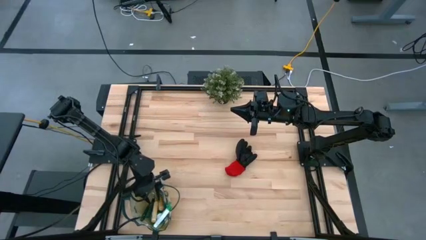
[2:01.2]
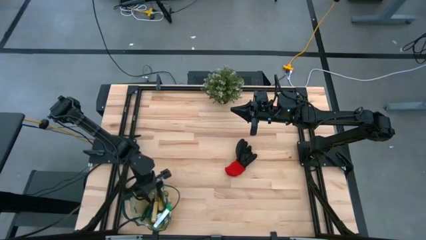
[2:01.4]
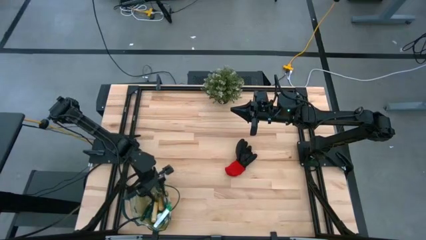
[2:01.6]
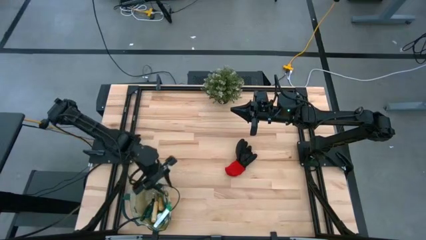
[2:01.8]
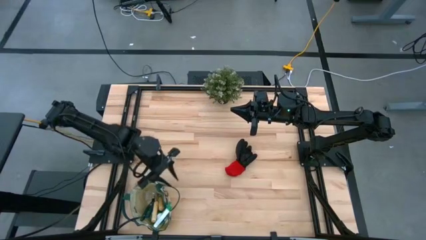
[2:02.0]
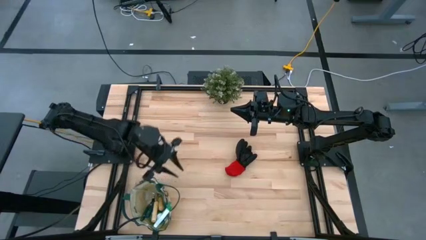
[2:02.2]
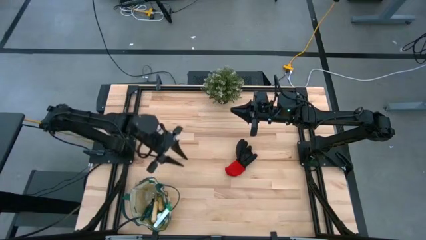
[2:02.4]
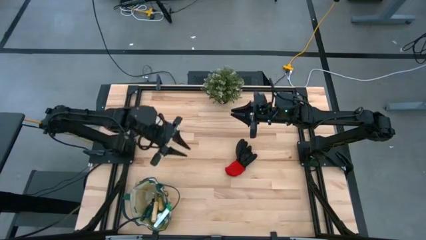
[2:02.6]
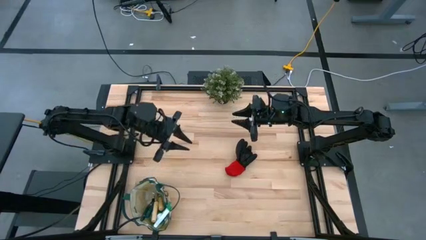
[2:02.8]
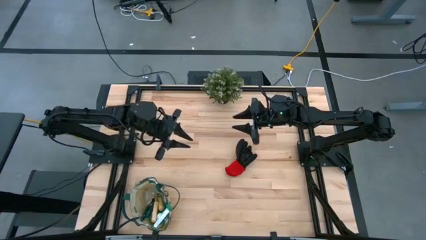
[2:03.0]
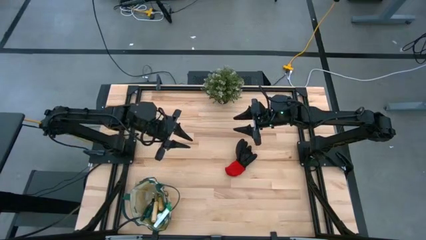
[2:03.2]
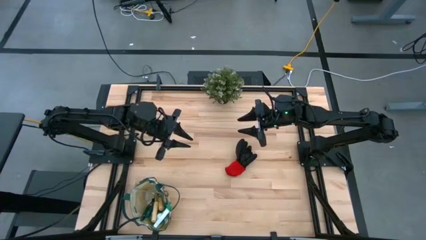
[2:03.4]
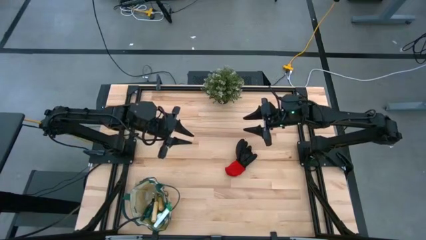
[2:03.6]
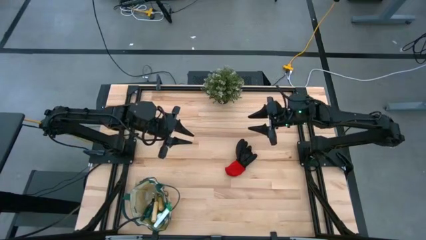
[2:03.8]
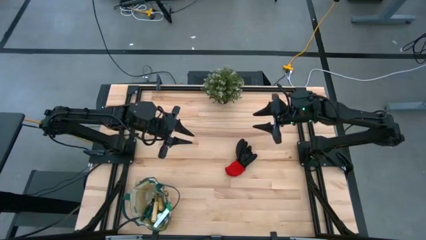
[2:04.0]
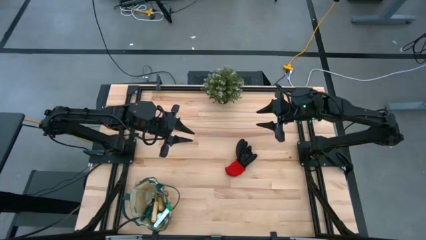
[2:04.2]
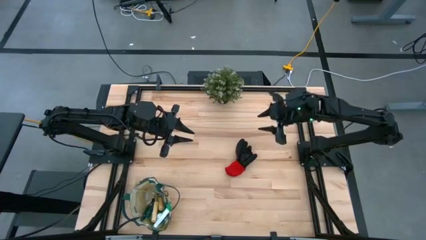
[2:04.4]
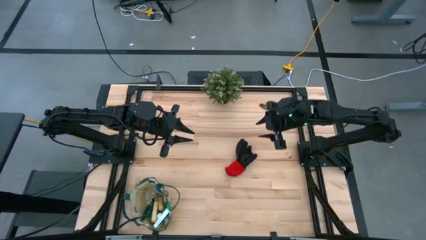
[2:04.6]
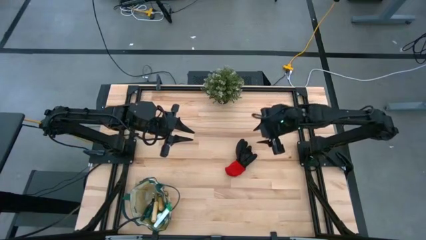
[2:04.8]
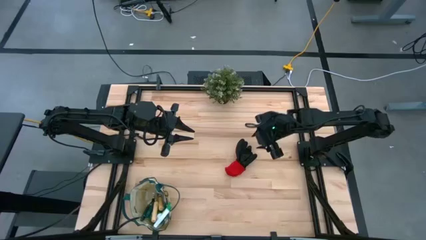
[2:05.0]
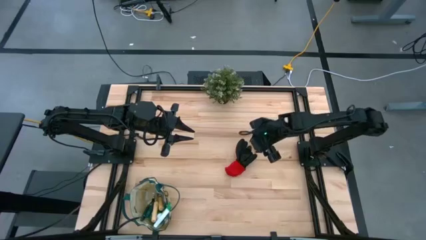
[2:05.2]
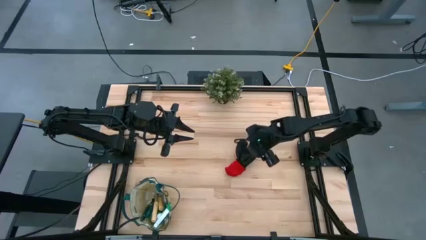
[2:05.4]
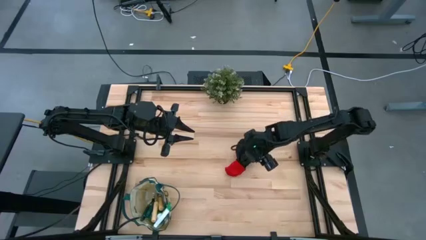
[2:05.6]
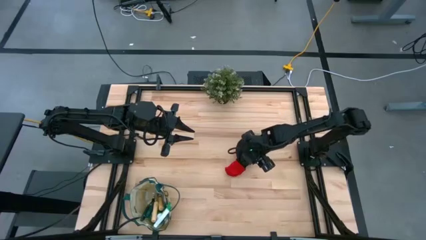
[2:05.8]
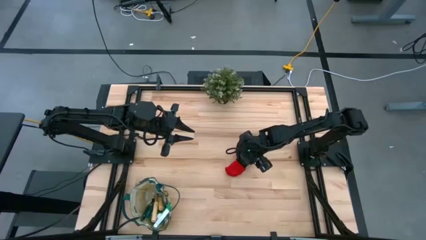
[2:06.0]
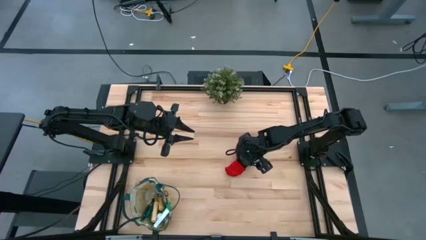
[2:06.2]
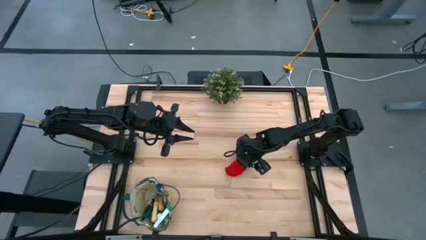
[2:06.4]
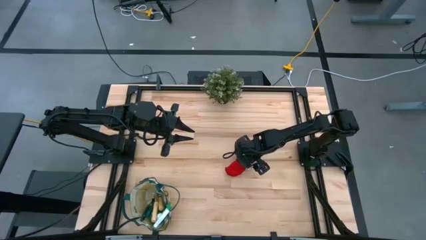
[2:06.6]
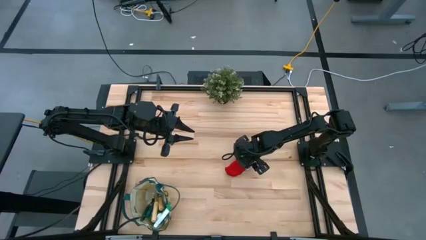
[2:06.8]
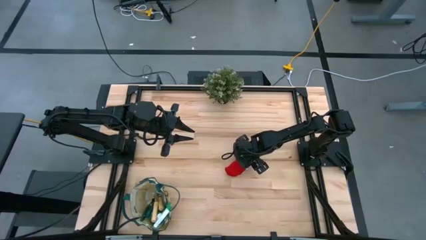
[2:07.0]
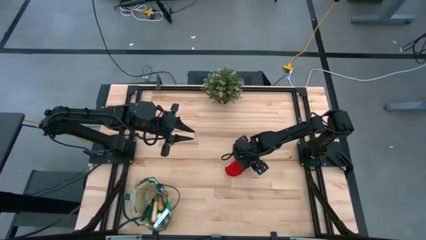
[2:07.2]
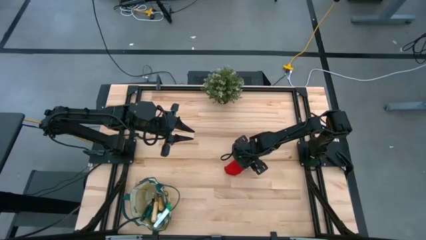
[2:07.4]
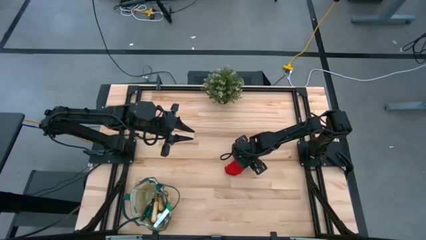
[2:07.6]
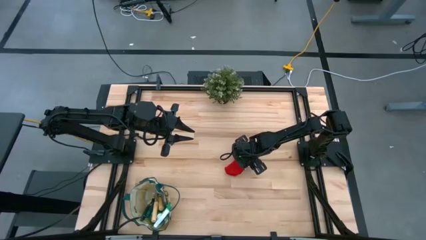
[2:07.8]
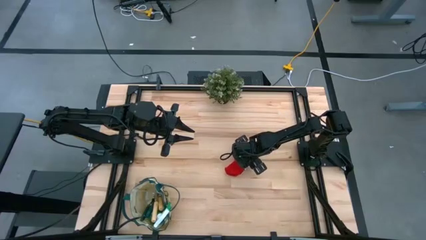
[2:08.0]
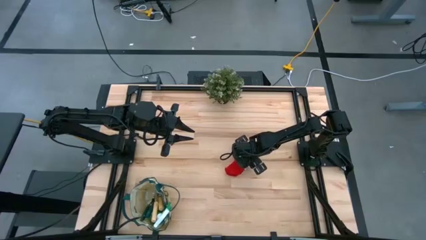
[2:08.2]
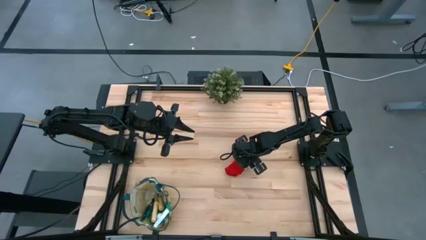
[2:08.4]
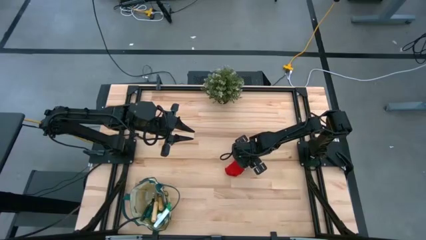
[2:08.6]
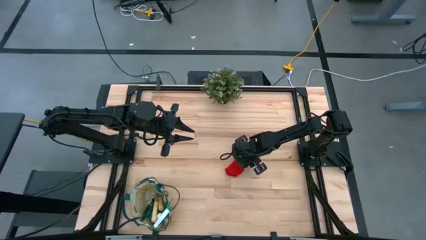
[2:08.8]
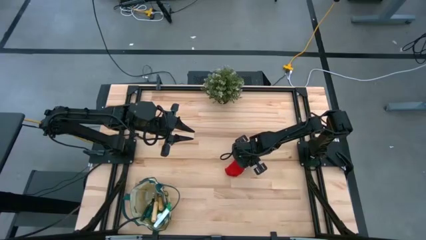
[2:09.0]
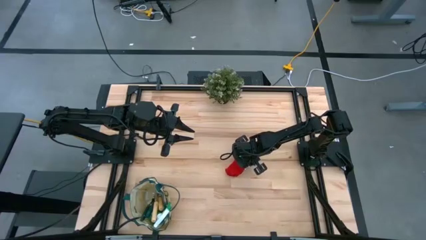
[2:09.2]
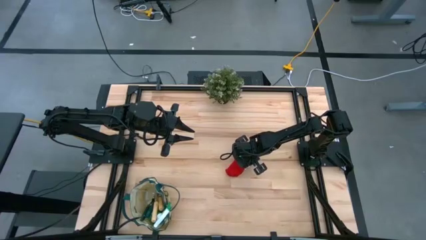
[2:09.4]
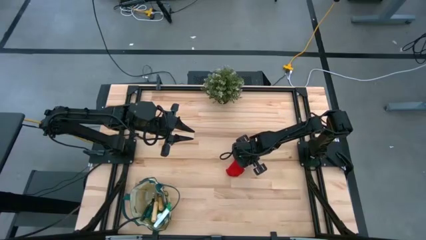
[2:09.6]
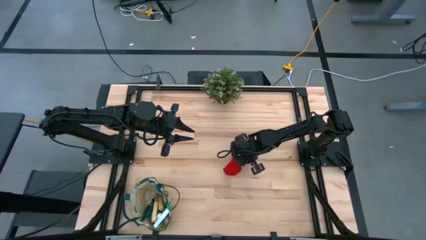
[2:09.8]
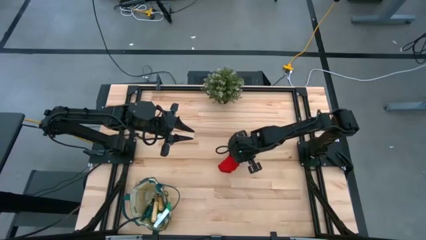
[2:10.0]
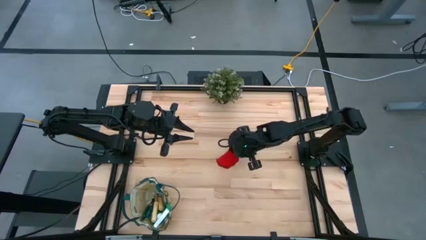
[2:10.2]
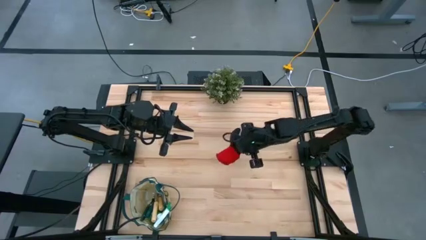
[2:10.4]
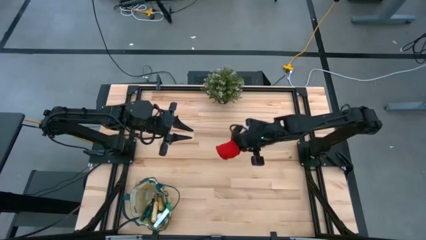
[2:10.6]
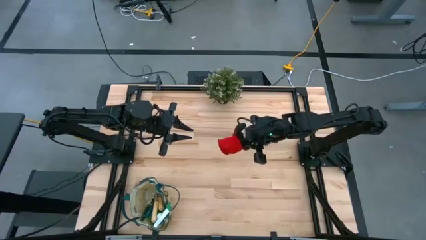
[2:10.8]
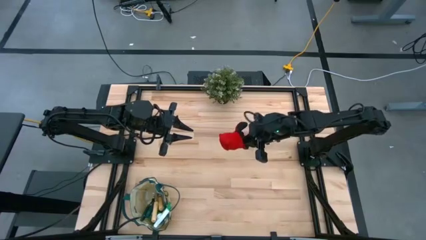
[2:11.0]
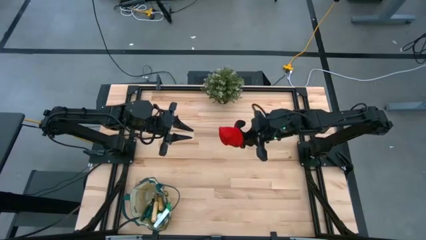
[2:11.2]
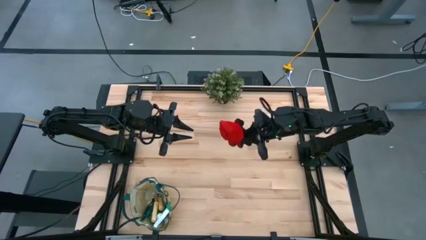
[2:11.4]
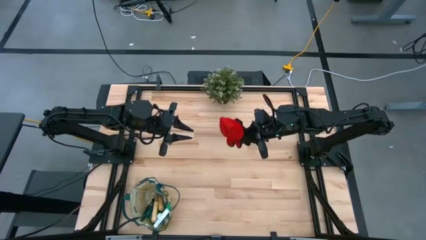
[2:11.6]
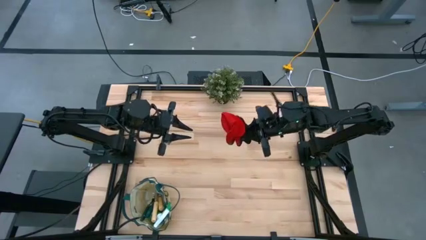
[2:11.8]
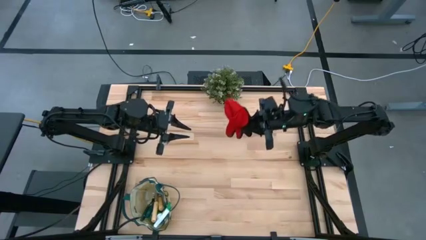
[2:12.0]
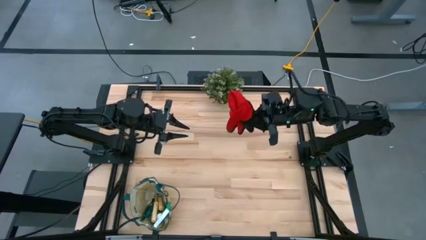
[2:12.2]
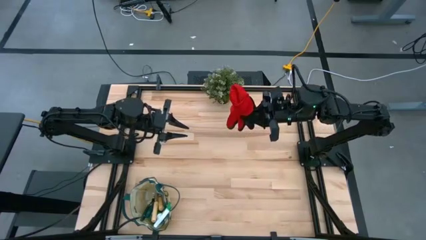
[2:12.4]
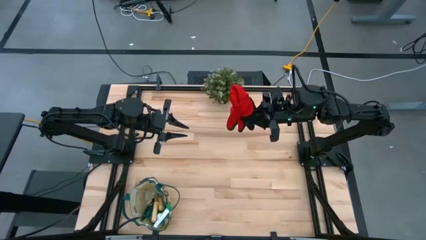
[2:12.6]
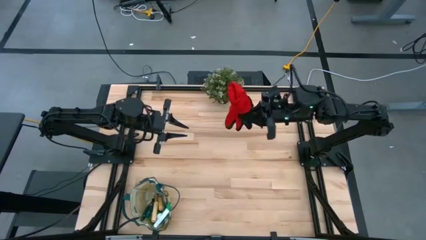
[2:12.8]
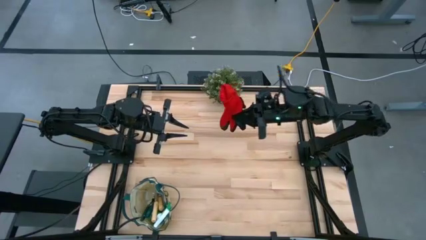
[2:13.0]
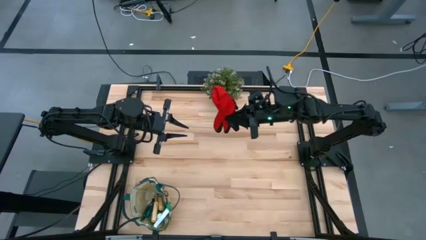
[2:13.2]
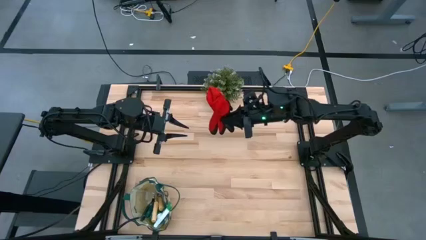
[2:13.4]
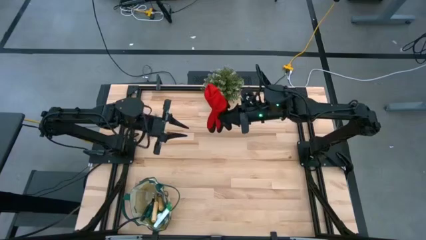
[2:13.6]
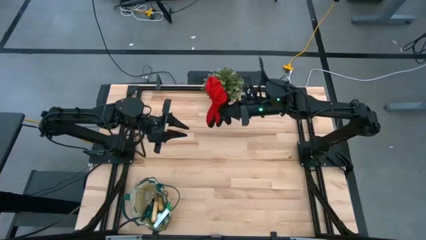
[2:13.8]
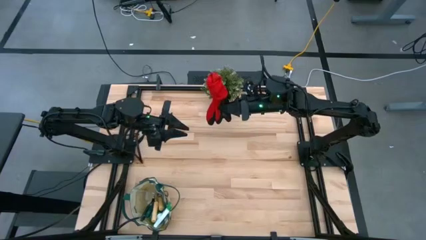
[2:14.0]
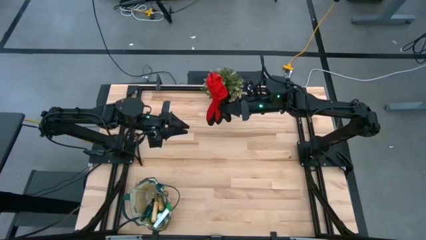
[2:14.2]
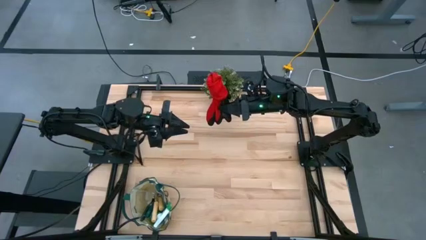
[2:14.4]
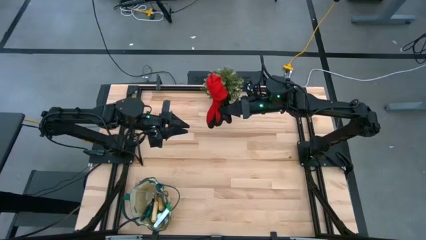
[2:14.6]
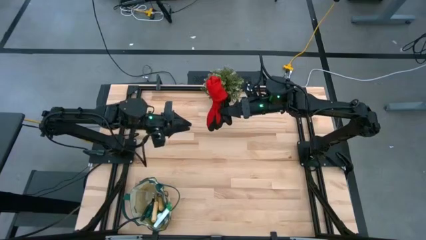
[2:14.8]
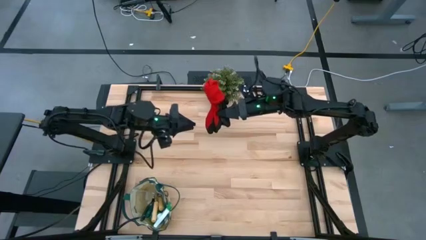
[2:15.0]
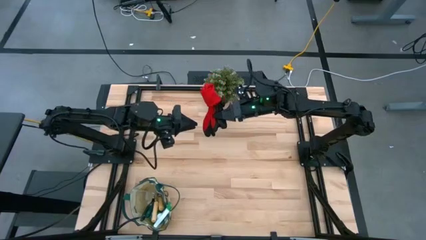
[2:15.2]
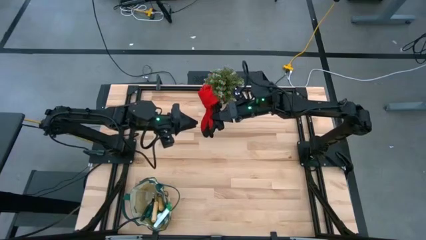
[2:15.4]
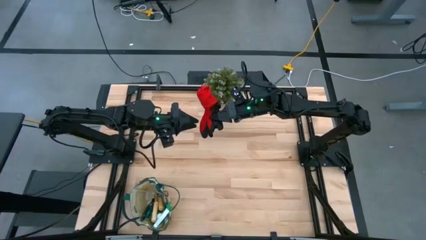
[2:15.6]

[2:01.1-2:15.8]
Task: Pick & Place Garden tools in Gardening bag
Put the red gloves into the gardening bag

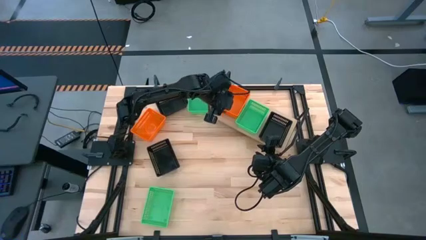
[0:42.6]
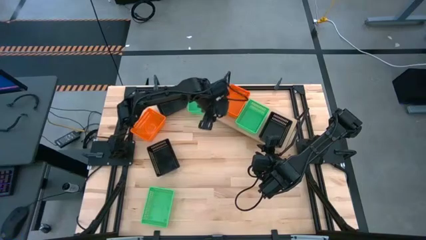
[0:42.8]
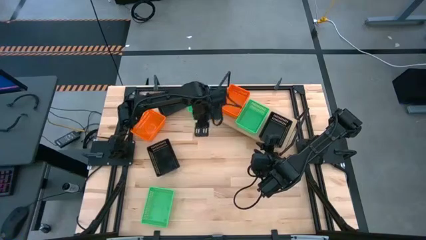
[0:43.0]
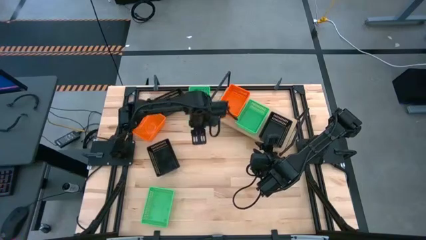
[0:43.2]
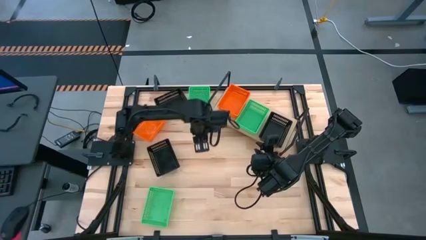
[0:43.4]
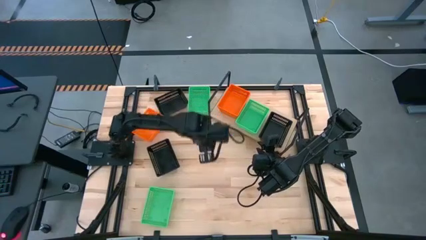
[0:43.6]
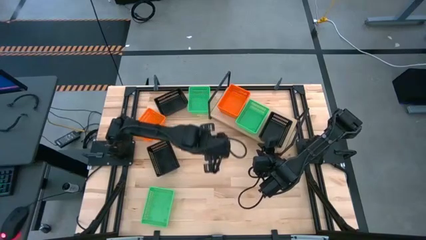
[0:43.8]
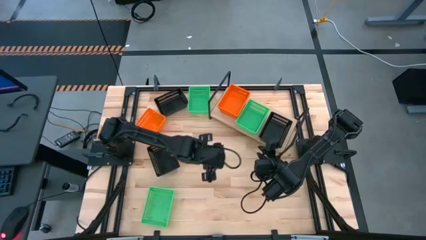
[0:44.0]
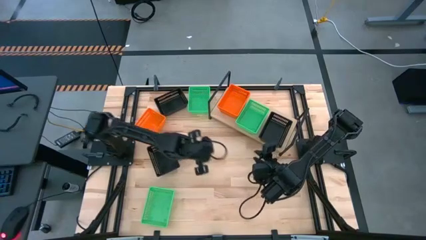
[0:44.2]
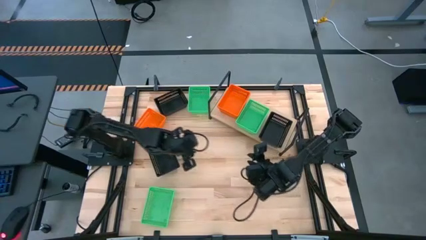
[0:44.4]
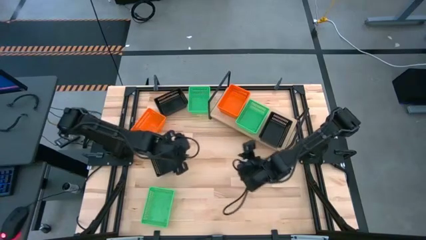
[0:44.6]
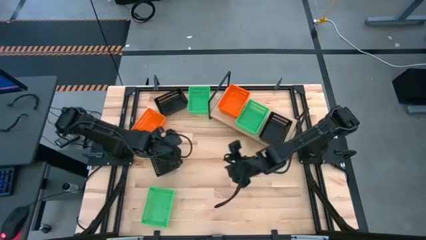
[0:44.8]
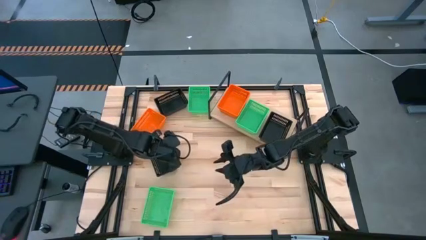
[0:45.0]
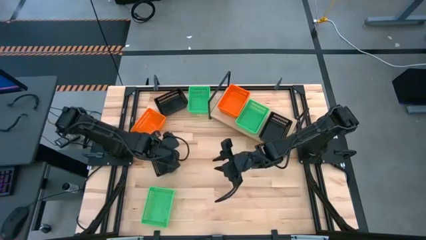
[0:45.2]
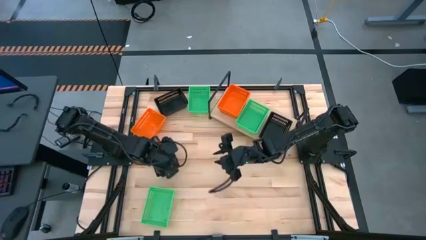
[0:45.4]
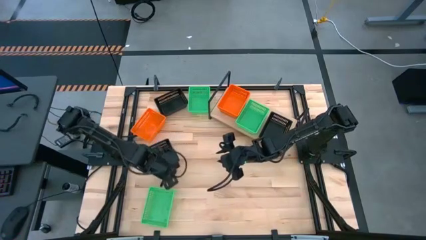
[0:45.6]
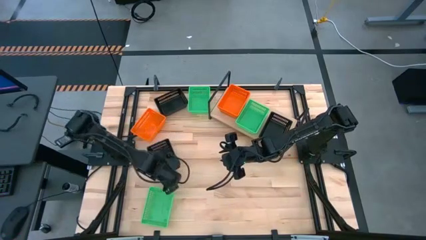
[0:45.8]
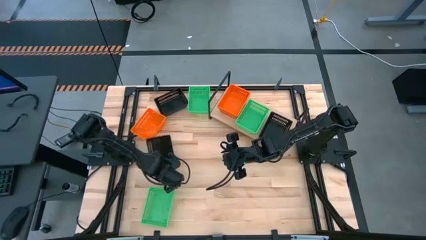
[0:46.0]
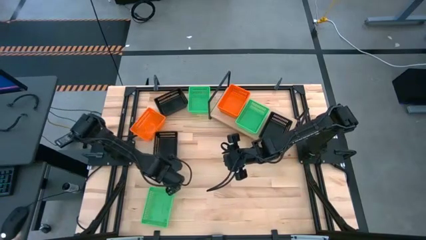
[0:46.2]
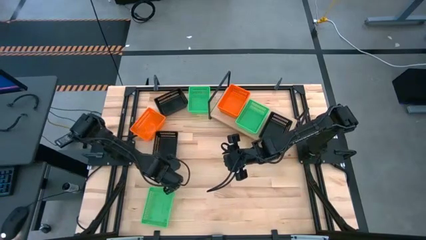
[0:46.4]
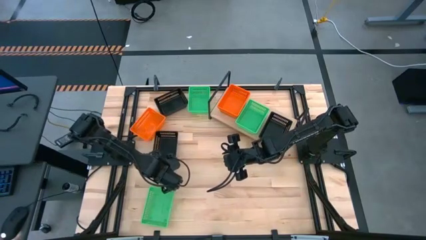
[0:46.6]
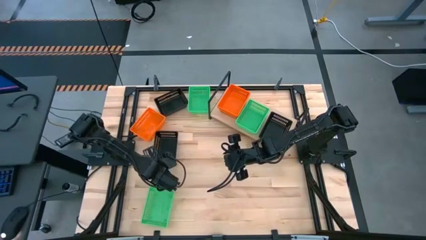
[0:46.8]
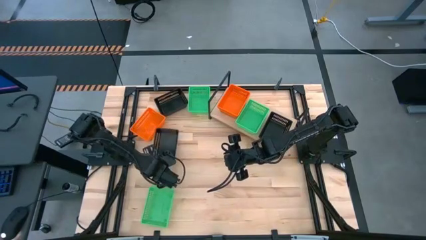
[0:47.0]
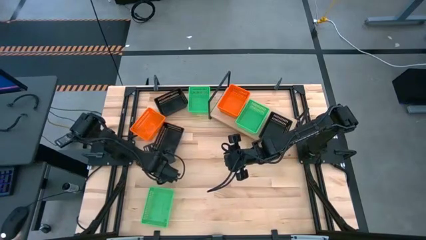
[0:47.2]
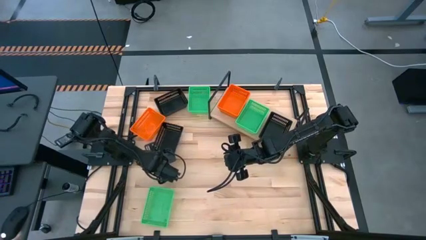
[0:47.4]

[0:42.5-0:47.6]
Task: Stack baskets on shelf by color
Stack the bottom black basket on top of the black basket on the shelf
